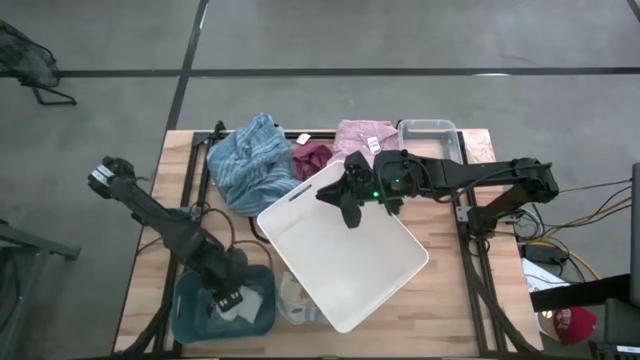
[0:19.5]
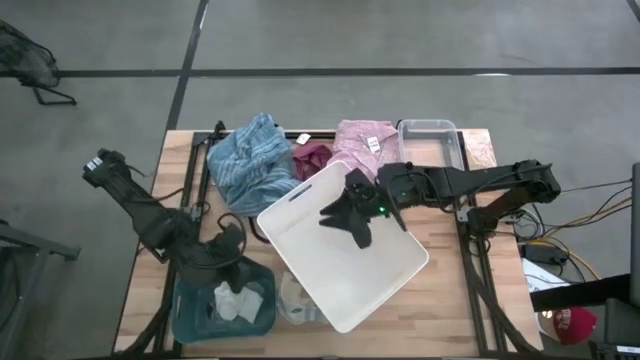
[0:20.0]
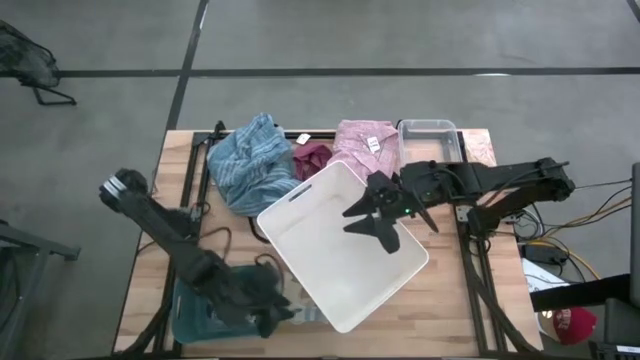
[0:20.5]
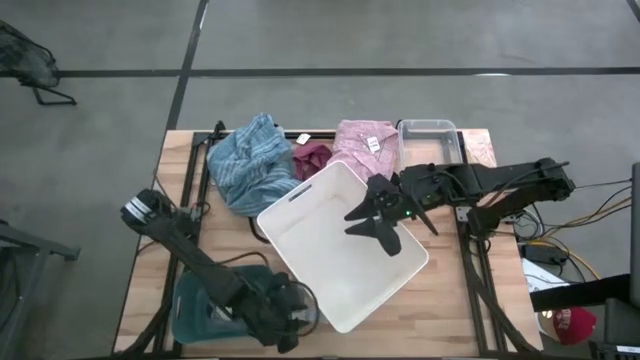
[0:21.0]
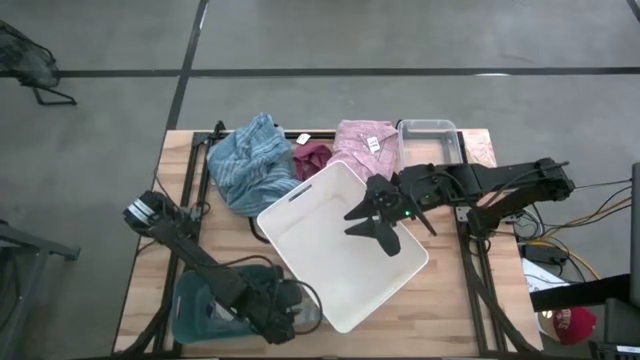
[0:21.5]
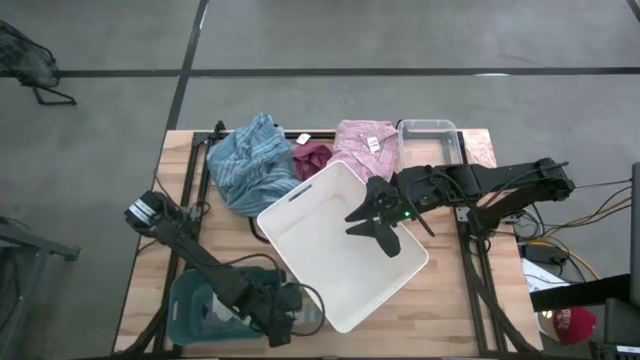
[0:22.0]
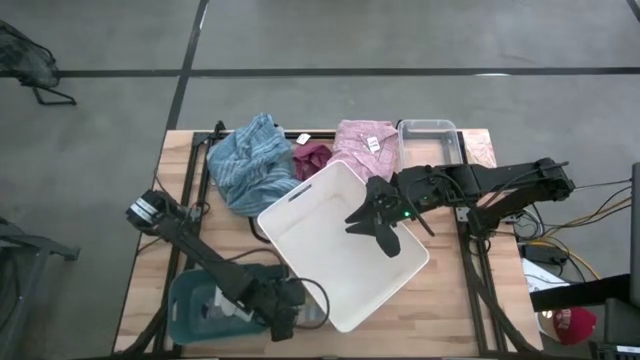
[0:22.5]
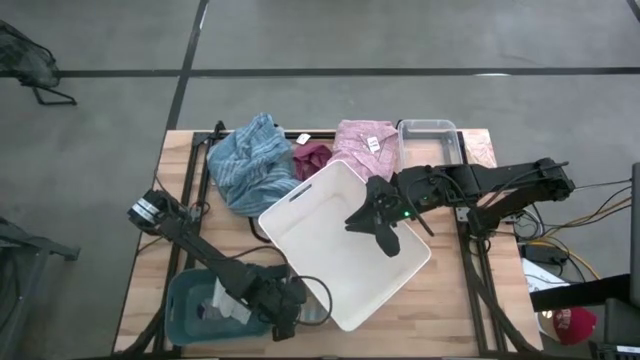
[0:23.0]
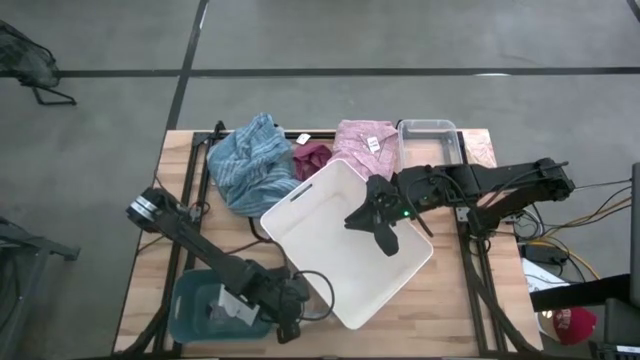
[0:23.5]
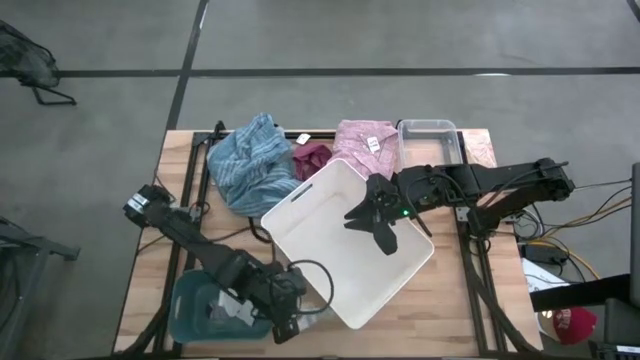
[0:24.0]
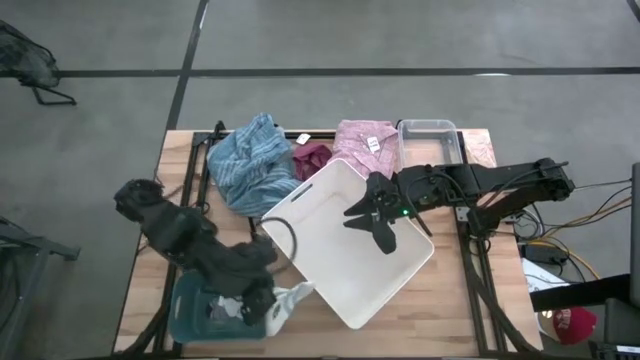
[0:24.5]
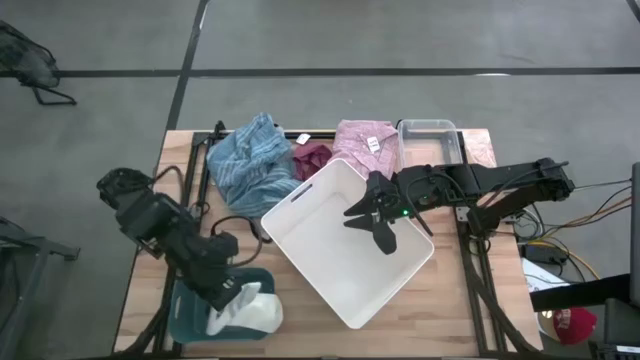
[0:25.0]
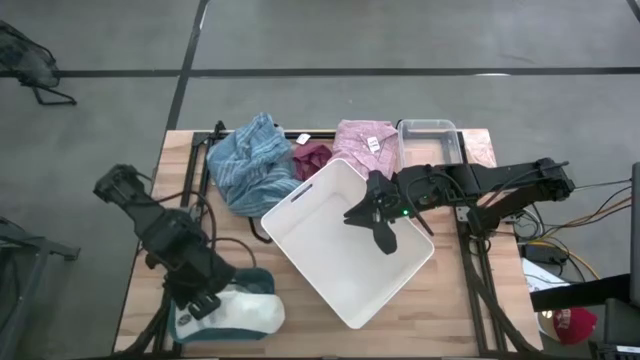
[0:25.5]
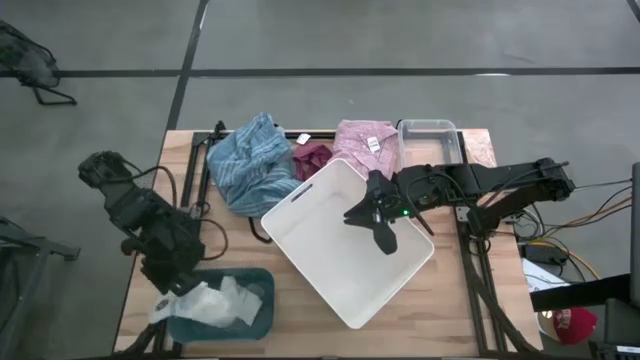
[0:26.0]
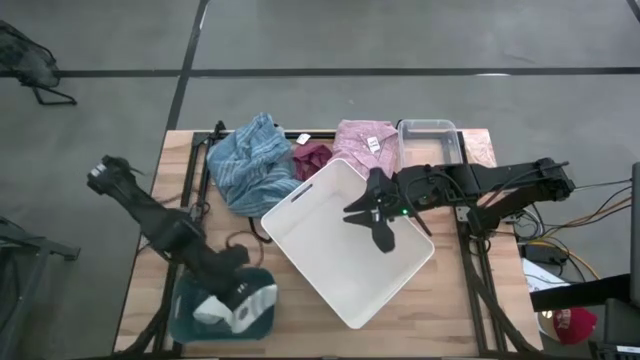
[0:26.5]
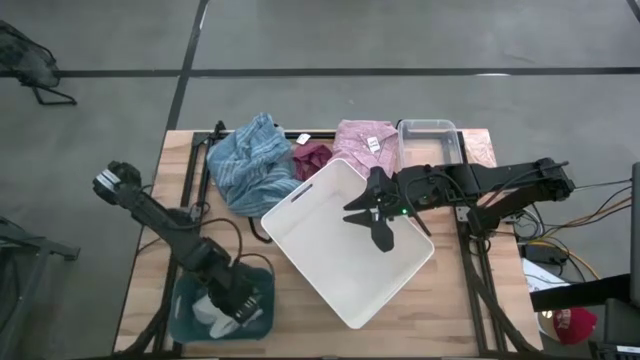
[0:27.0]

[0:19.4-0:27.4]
Task: Pick & Place Cloths
Put the blue and white sock into the green bin

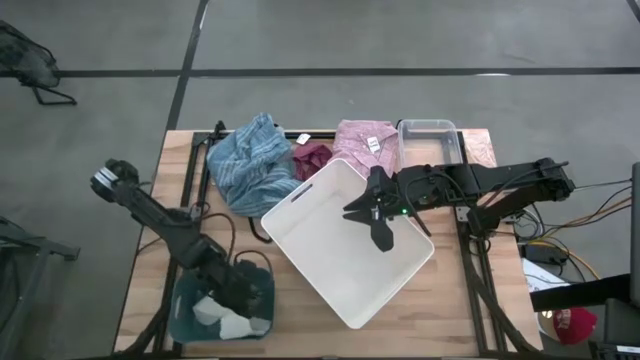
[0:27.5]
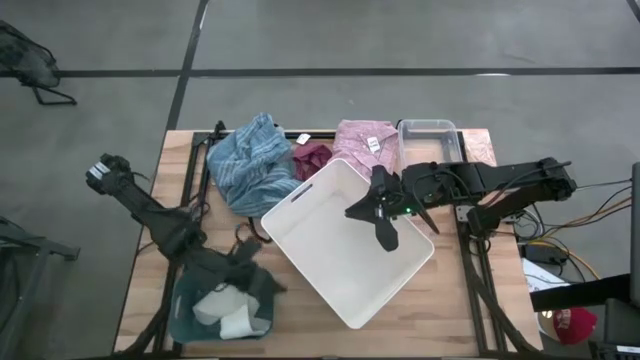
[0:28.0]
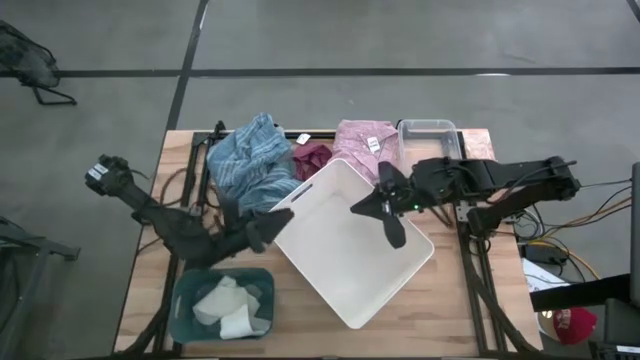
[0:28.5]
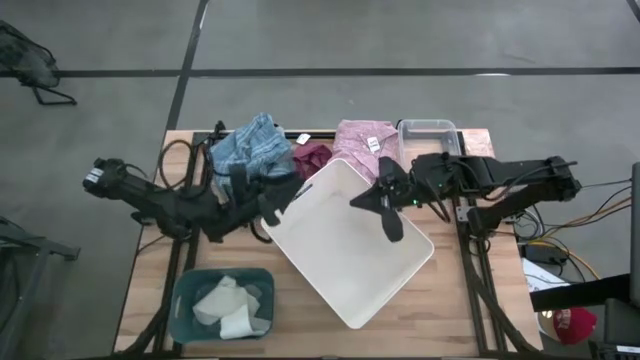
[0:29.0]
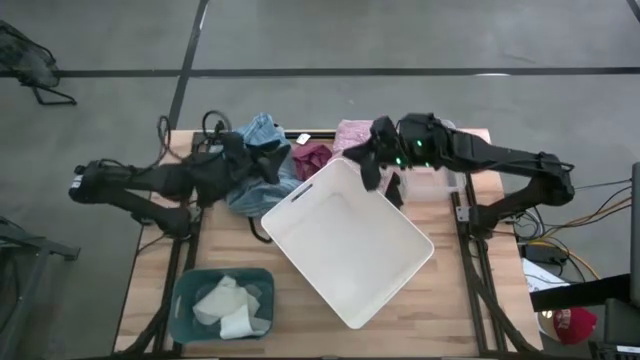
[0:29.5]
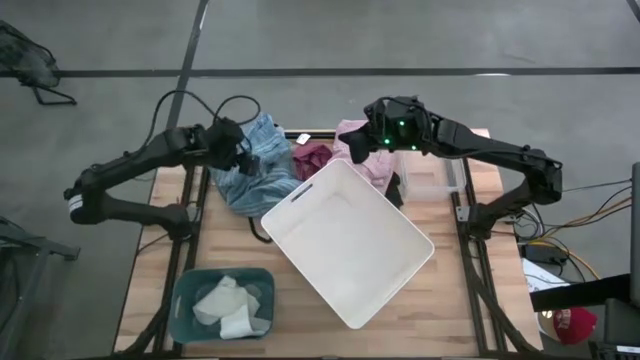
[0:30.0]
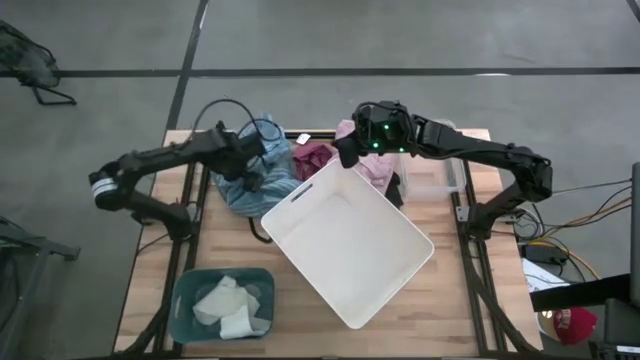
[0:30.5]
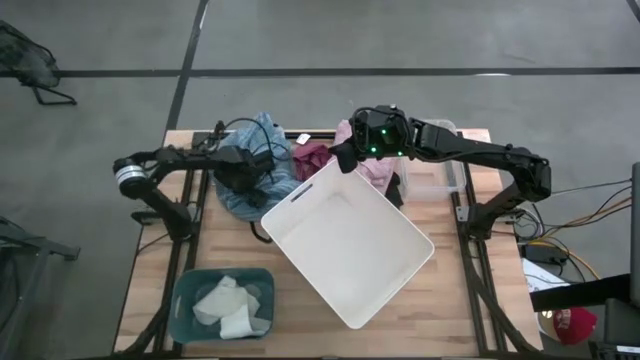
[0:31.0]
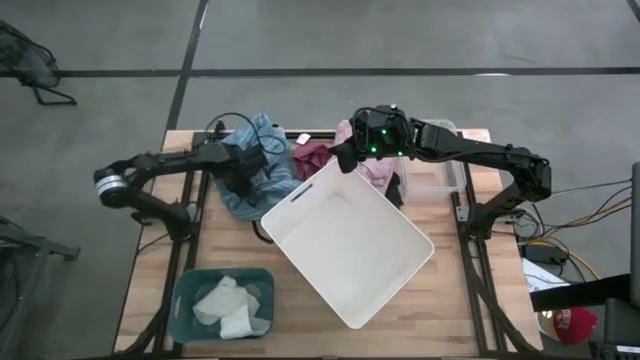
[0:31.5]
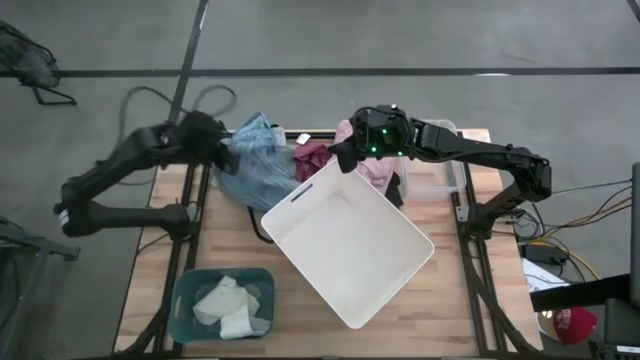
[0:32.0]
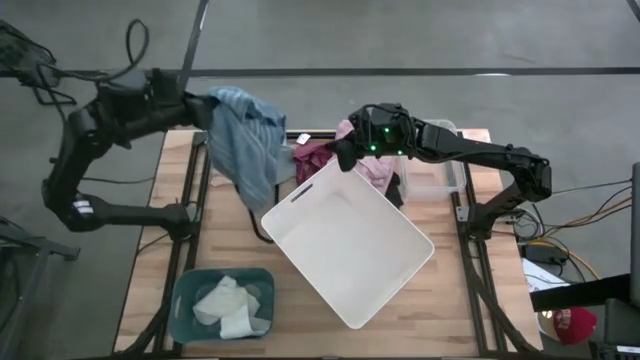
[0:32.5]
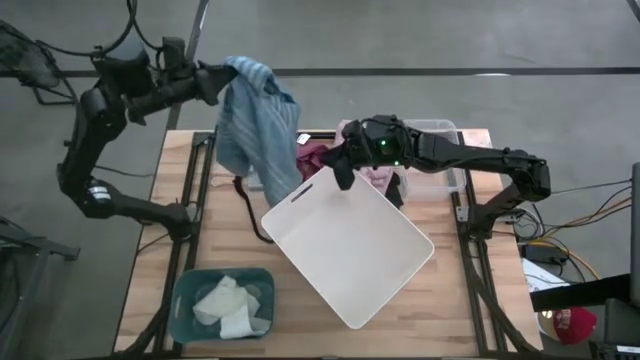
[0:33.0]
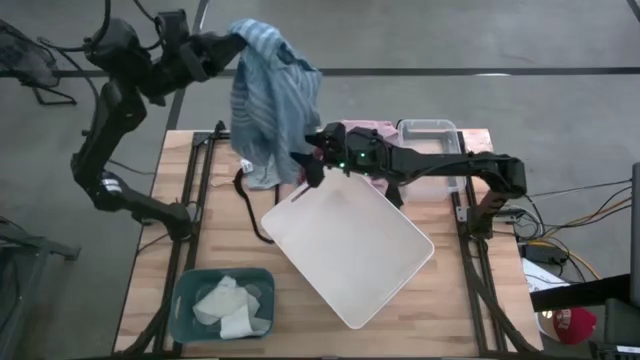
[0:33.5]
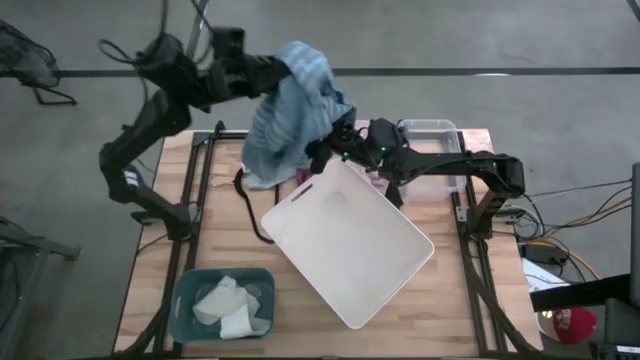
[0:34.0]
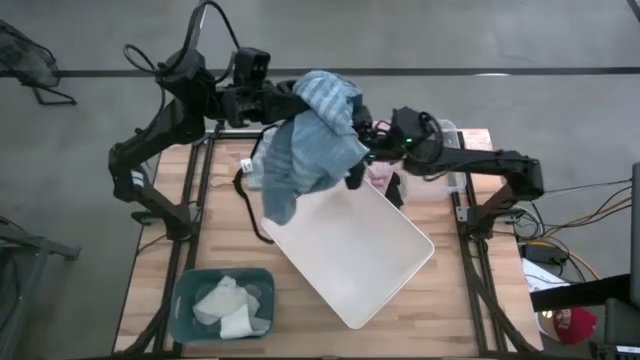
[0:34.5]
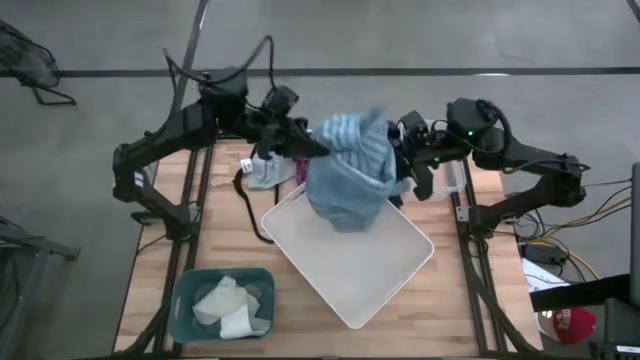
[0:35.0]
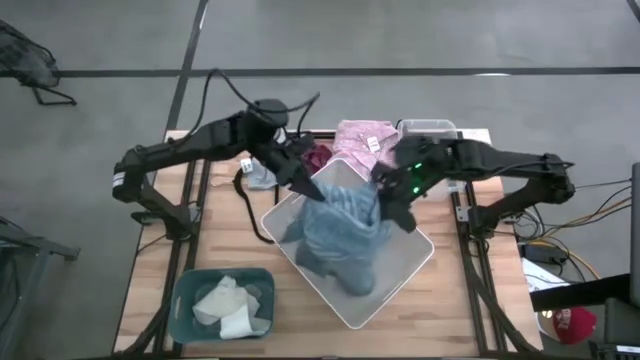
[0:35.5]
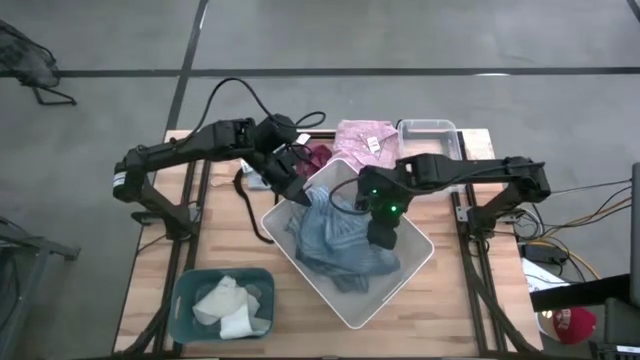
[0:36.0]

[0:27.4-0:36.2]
Put the blue shirt into the white bin

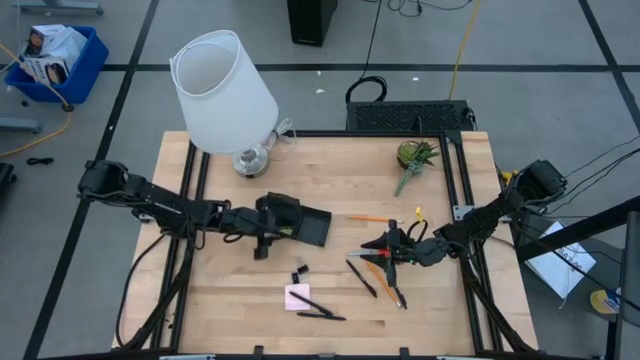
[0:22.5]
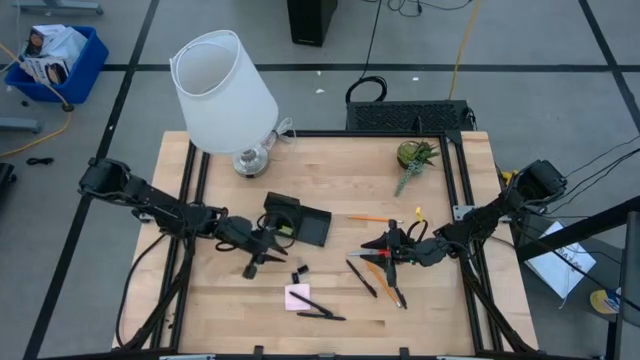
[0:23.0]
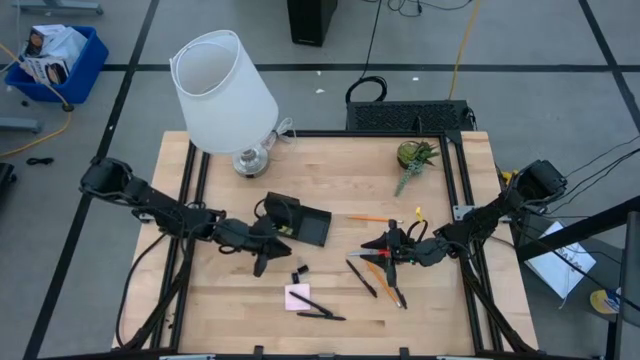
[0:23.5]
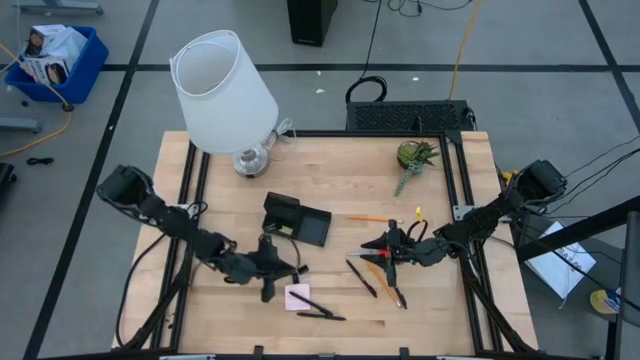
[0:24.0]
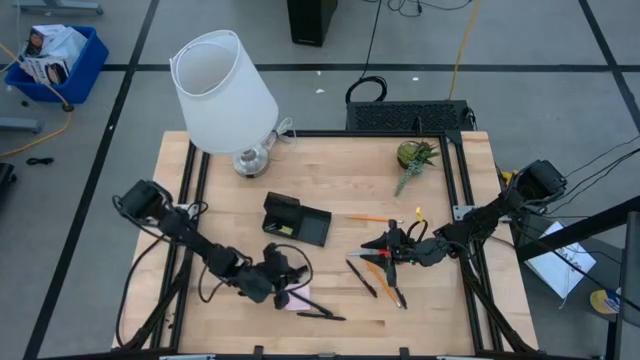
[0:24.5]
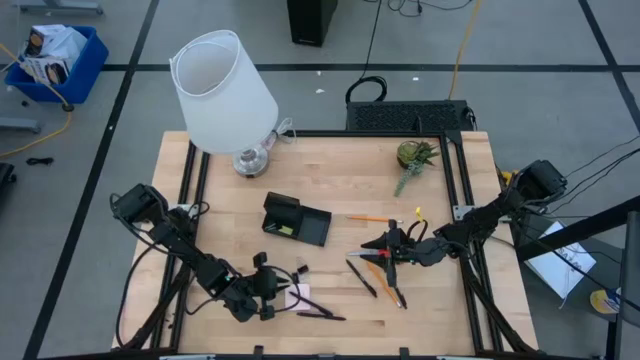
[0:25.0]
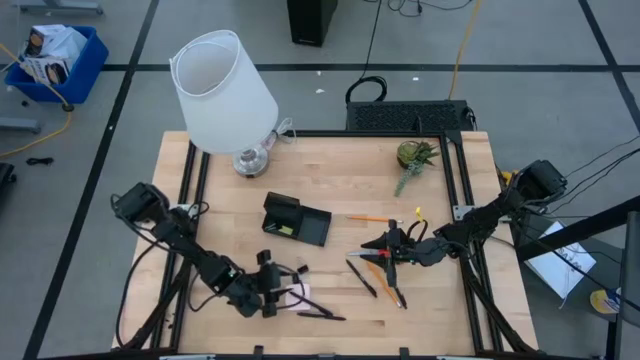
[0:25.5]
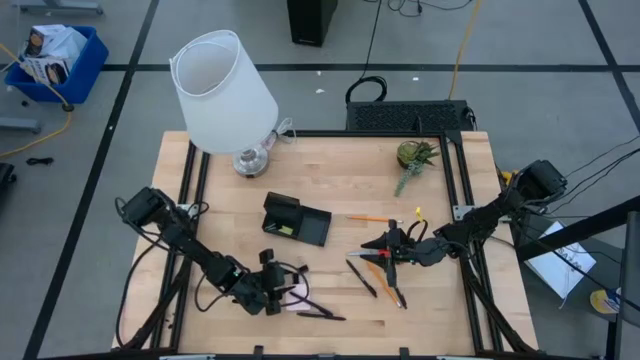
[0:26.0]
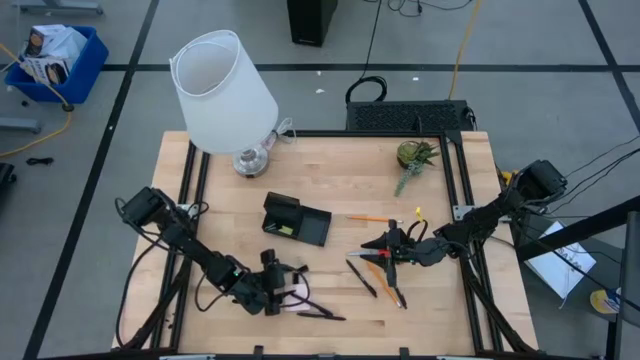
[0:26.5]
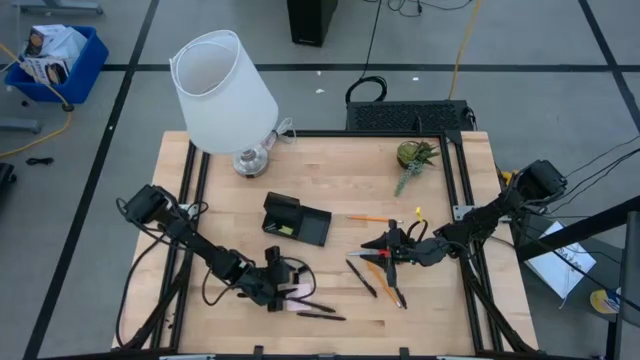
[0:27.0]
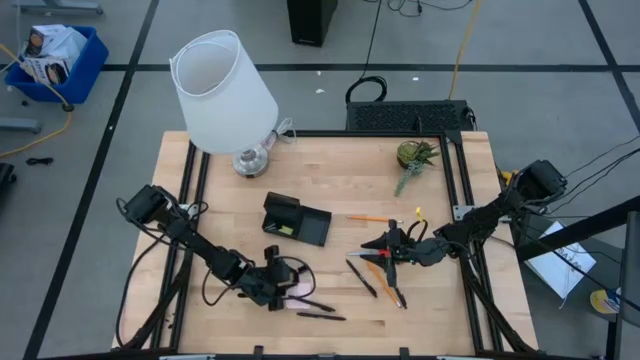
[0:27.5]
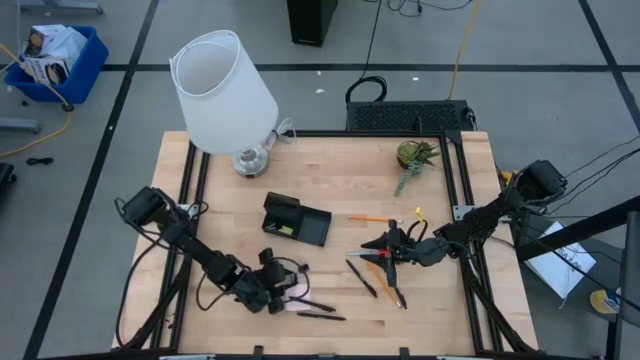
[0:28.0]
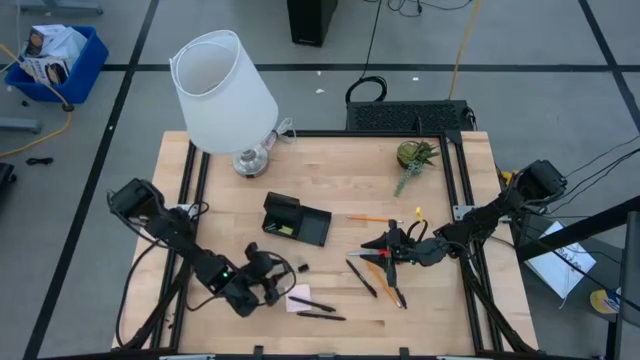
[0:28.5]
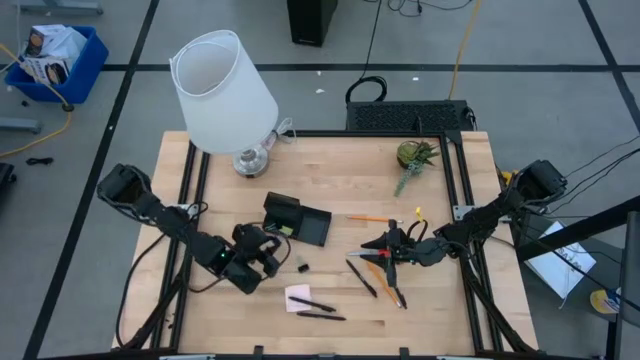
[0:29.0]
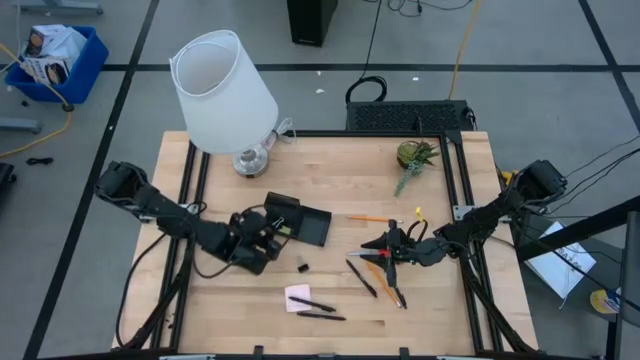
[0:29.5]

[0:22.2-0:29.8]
Task: Pick and place office supplies into organizer
Put the bottom binder clip into the black desk organizer
